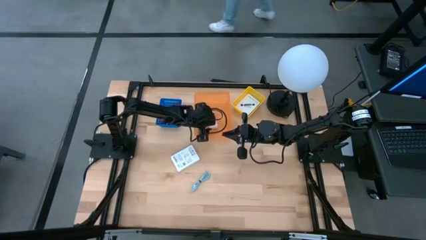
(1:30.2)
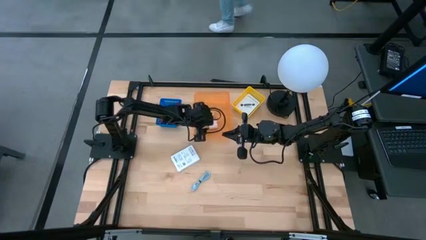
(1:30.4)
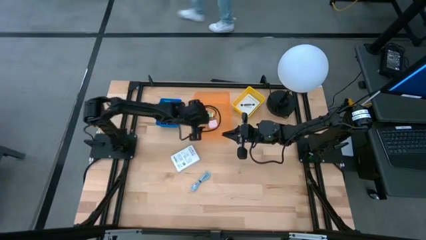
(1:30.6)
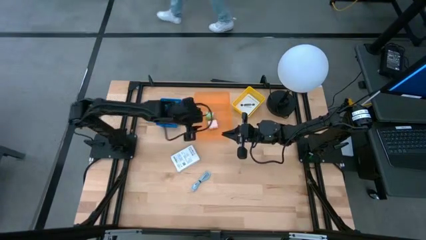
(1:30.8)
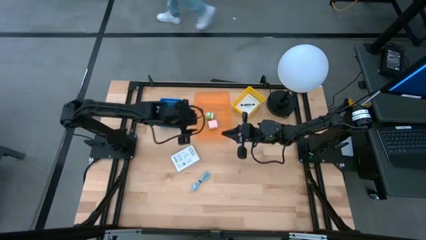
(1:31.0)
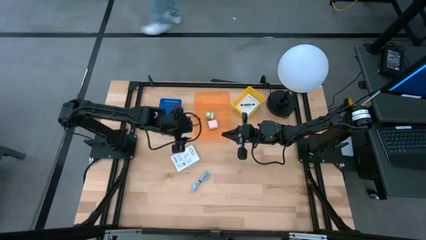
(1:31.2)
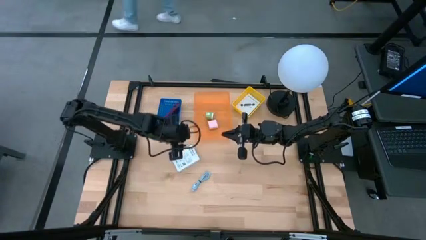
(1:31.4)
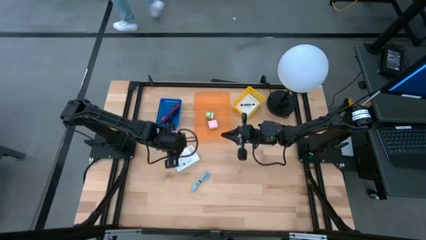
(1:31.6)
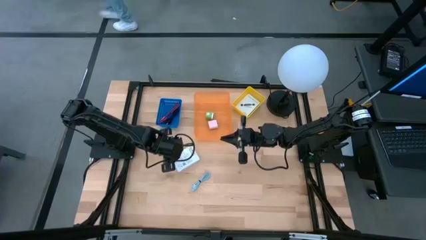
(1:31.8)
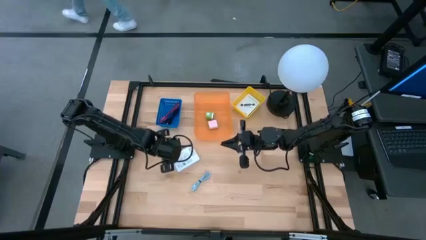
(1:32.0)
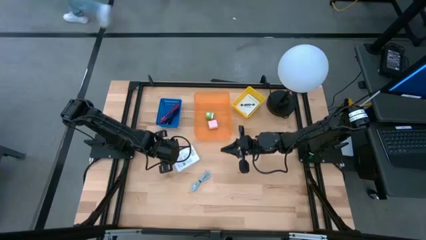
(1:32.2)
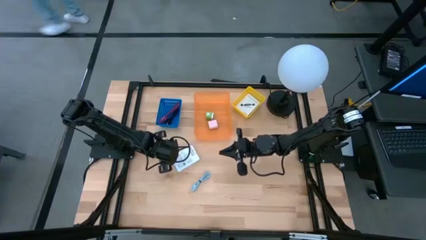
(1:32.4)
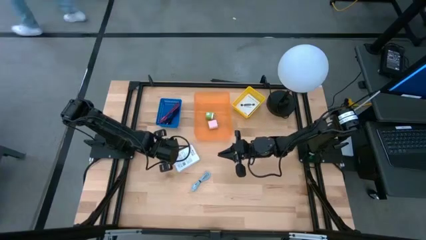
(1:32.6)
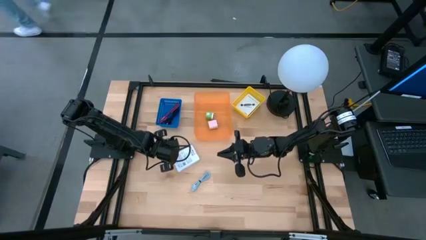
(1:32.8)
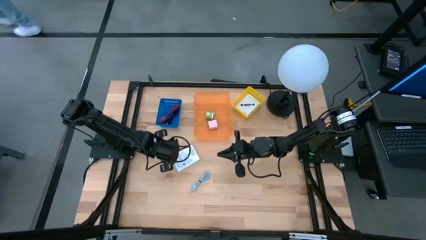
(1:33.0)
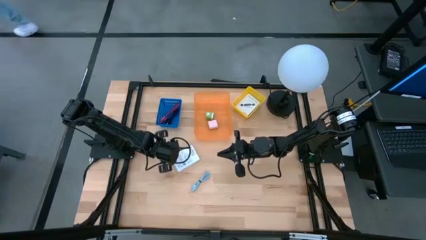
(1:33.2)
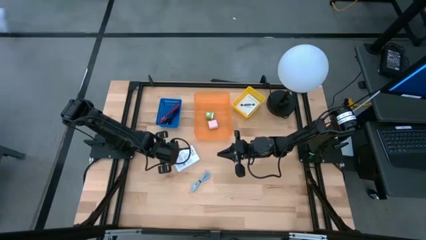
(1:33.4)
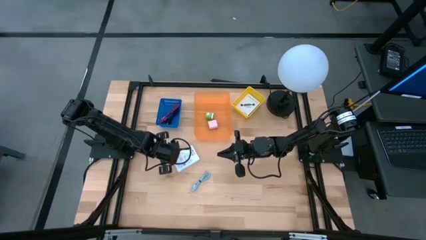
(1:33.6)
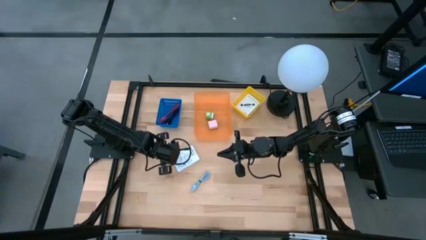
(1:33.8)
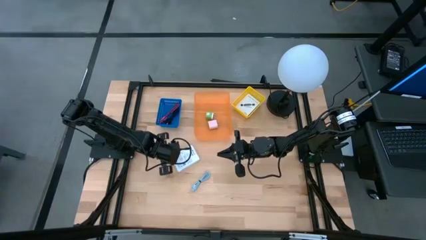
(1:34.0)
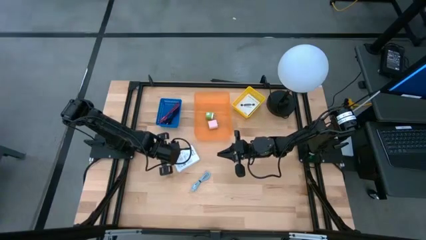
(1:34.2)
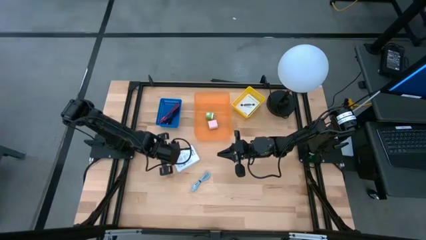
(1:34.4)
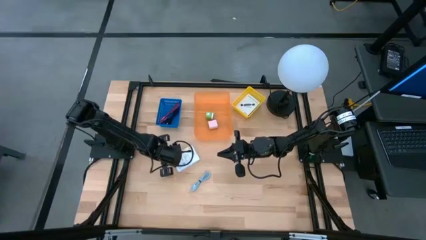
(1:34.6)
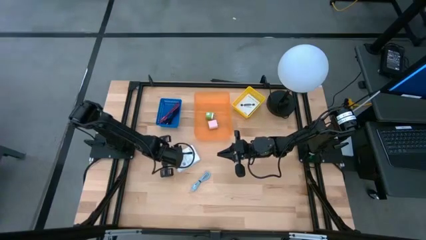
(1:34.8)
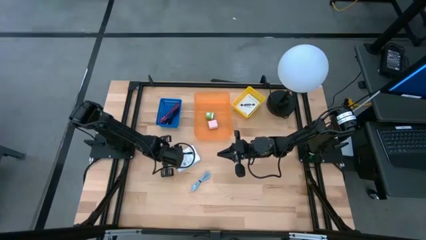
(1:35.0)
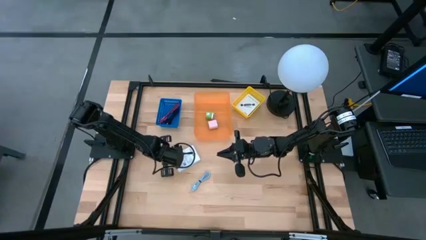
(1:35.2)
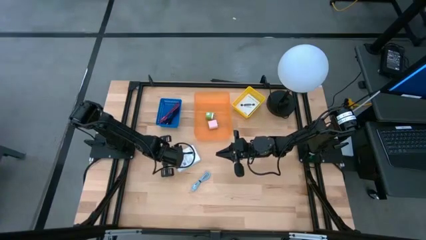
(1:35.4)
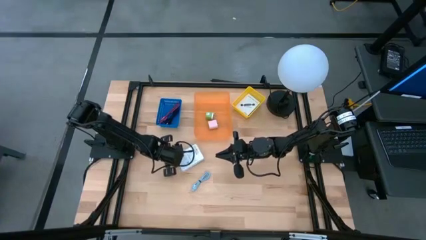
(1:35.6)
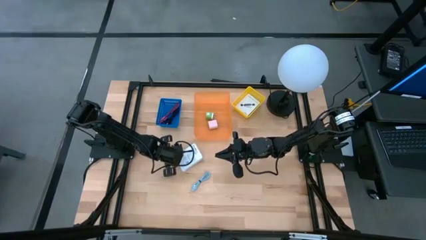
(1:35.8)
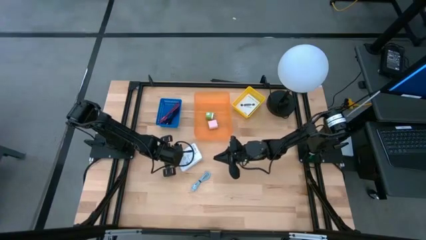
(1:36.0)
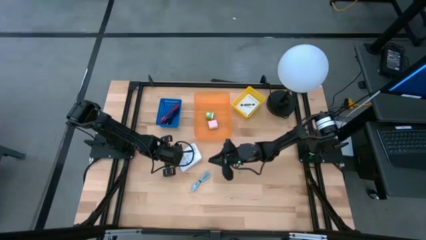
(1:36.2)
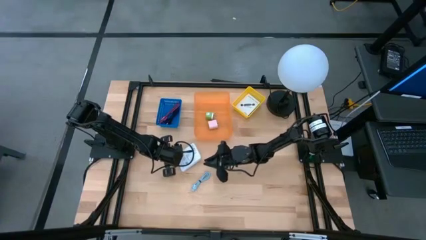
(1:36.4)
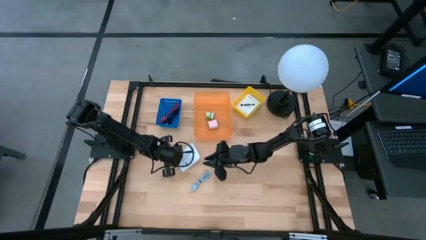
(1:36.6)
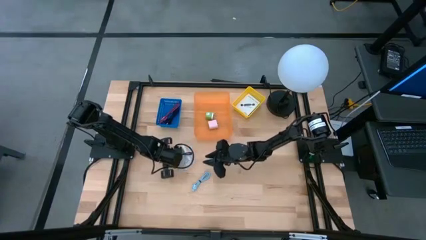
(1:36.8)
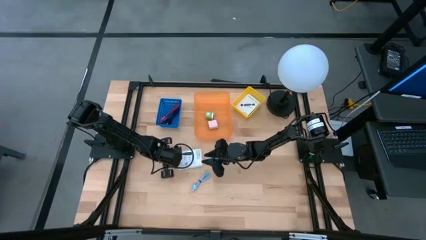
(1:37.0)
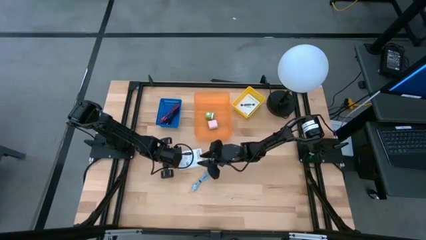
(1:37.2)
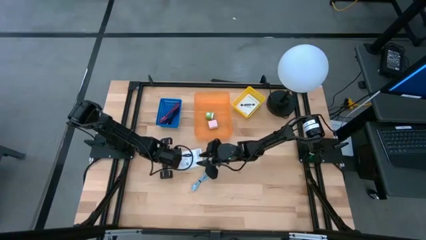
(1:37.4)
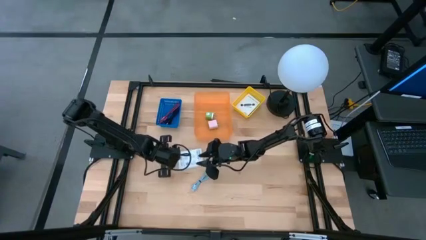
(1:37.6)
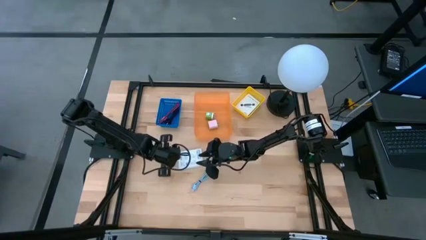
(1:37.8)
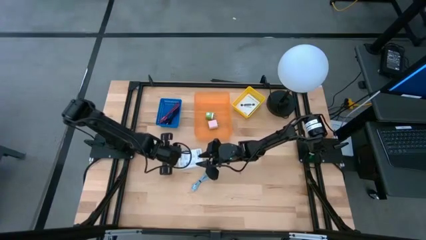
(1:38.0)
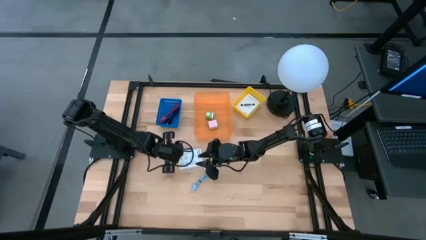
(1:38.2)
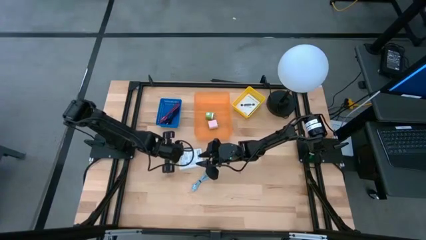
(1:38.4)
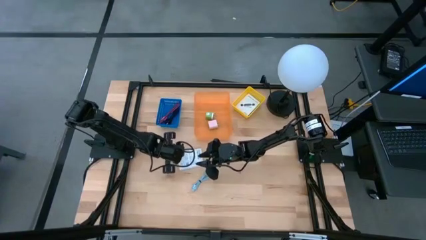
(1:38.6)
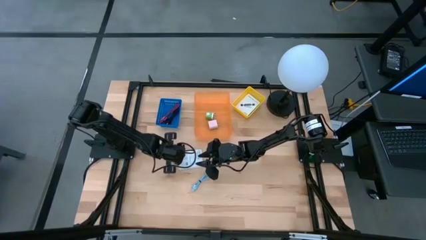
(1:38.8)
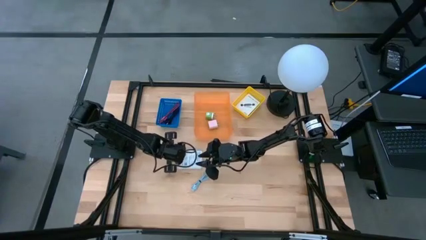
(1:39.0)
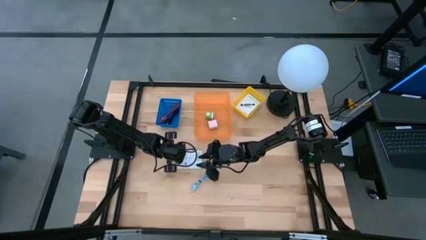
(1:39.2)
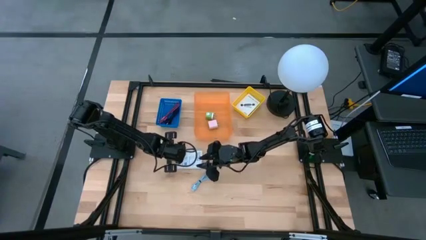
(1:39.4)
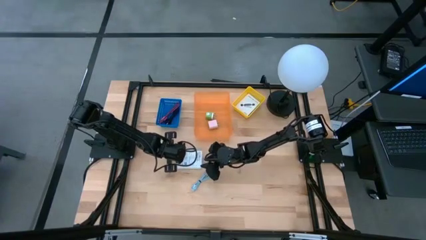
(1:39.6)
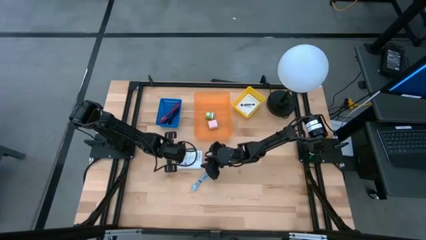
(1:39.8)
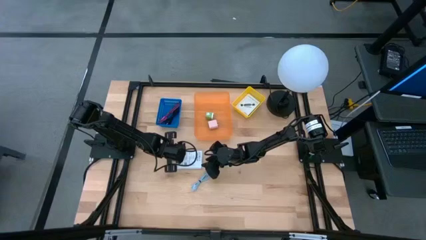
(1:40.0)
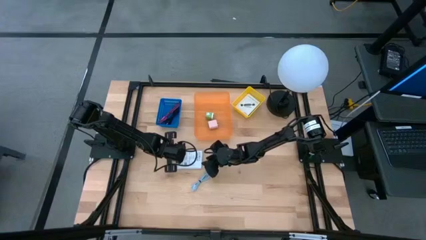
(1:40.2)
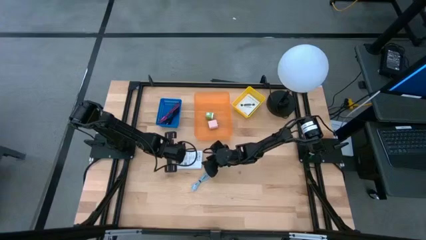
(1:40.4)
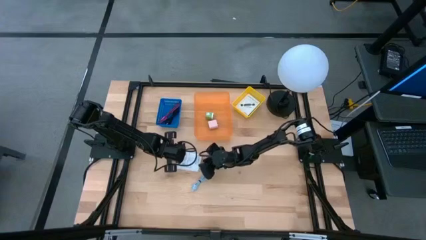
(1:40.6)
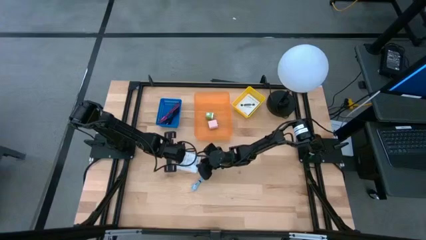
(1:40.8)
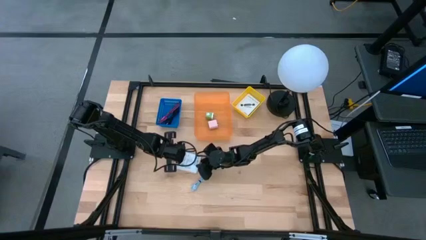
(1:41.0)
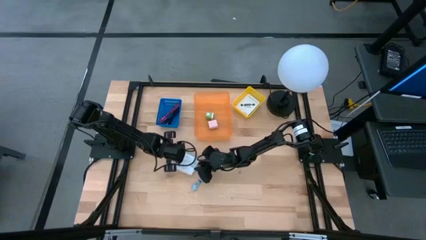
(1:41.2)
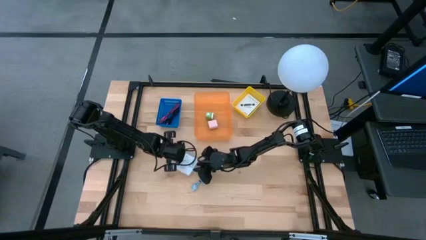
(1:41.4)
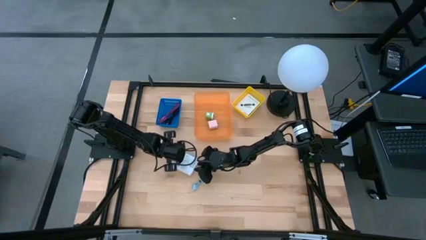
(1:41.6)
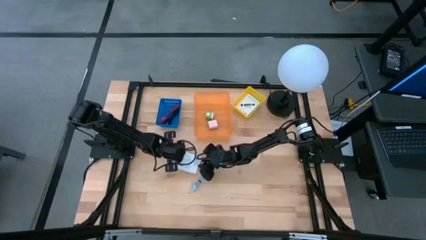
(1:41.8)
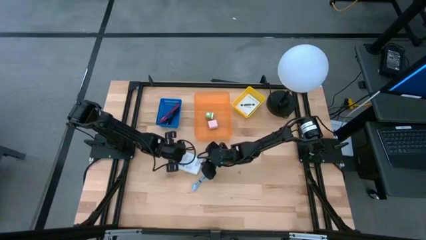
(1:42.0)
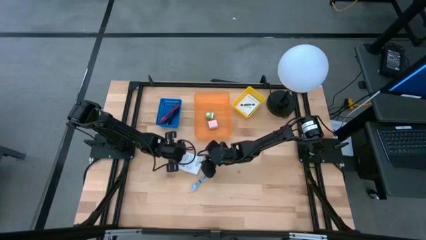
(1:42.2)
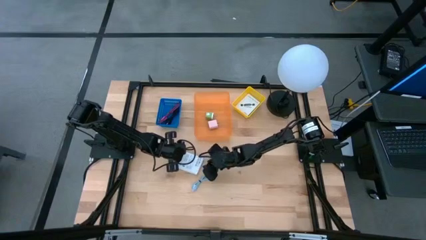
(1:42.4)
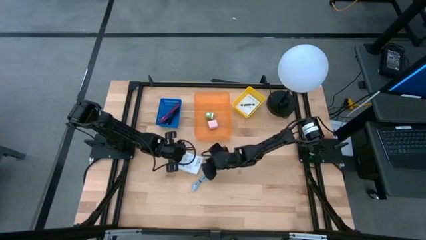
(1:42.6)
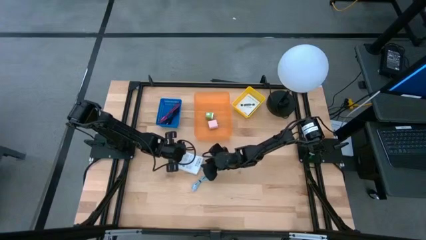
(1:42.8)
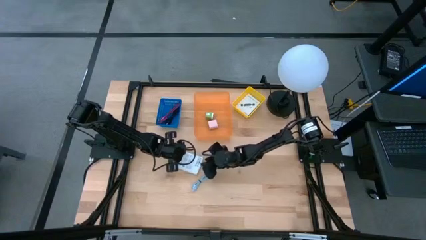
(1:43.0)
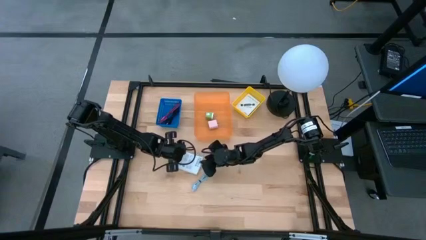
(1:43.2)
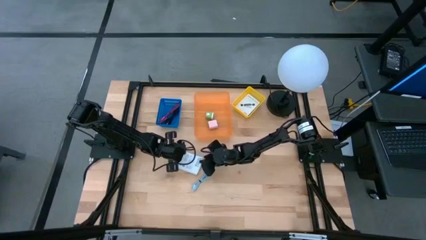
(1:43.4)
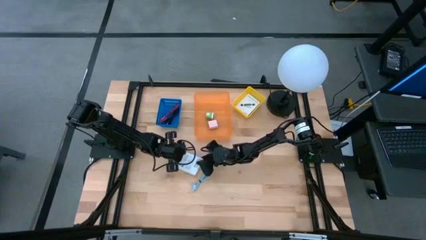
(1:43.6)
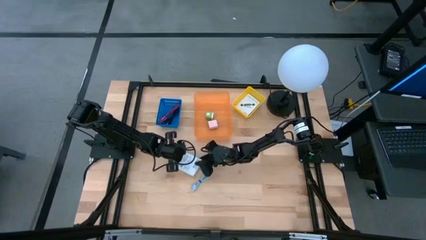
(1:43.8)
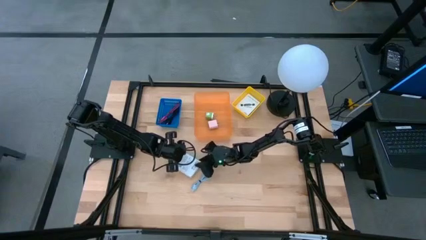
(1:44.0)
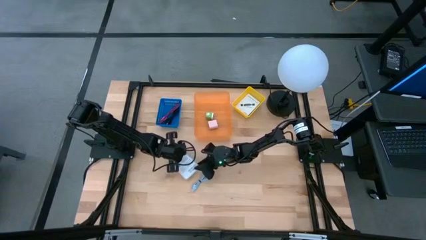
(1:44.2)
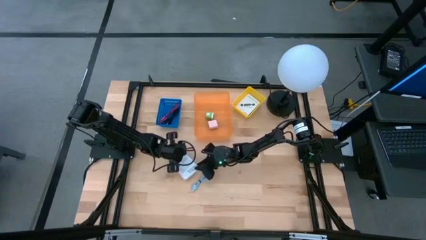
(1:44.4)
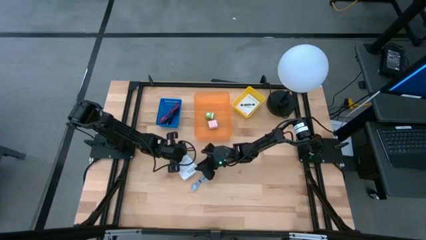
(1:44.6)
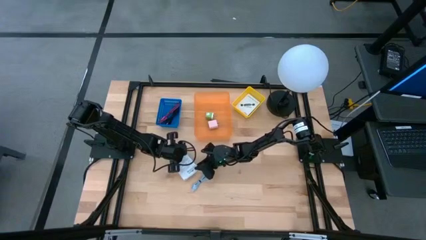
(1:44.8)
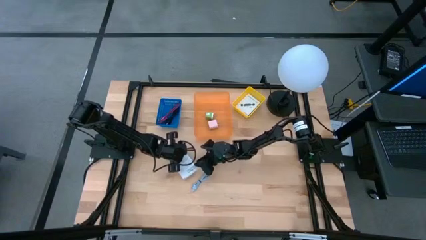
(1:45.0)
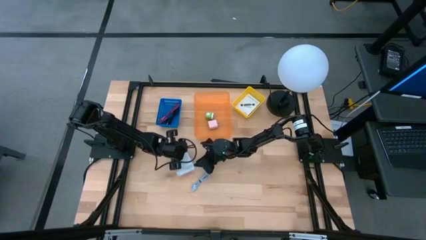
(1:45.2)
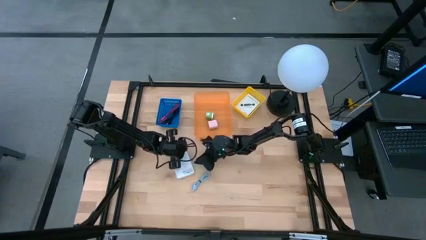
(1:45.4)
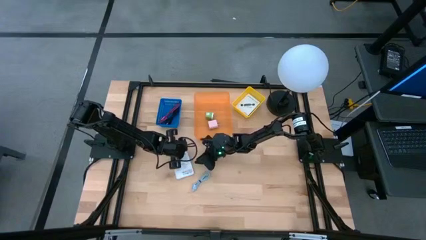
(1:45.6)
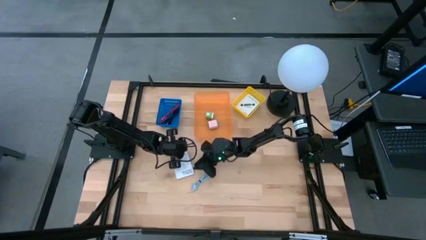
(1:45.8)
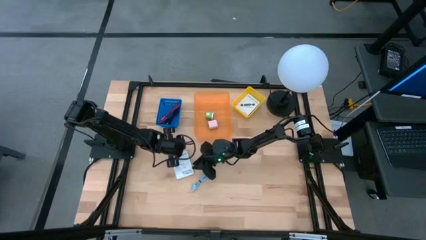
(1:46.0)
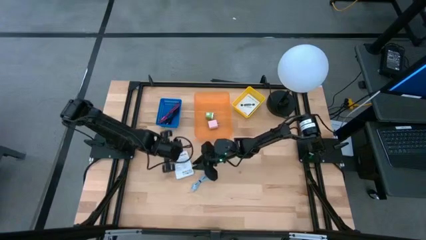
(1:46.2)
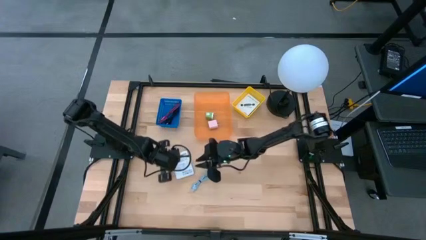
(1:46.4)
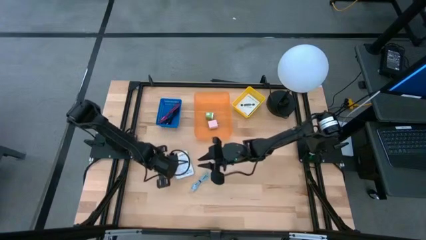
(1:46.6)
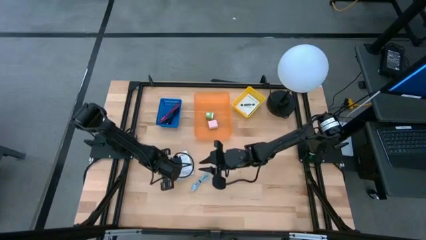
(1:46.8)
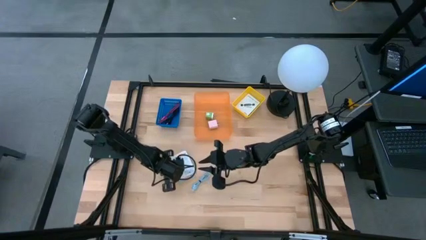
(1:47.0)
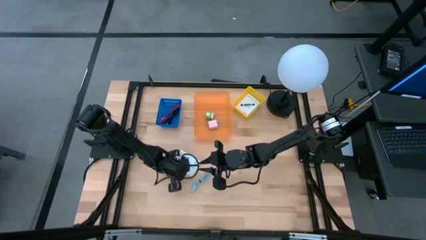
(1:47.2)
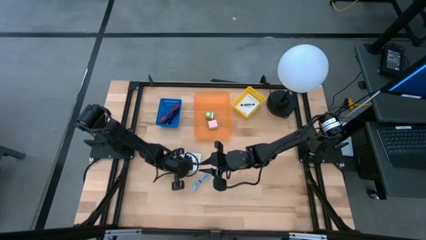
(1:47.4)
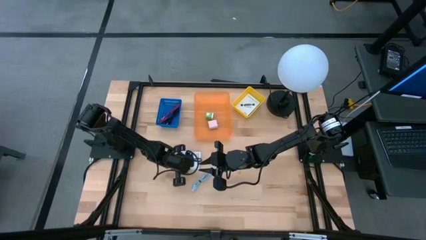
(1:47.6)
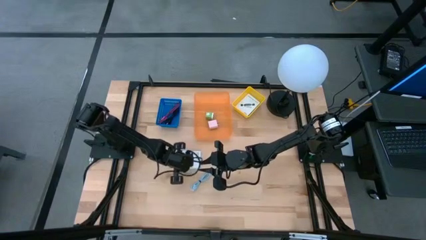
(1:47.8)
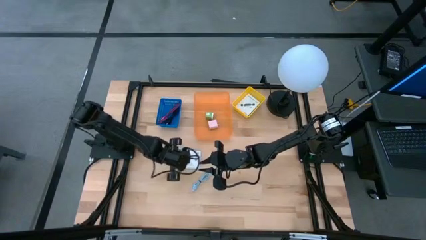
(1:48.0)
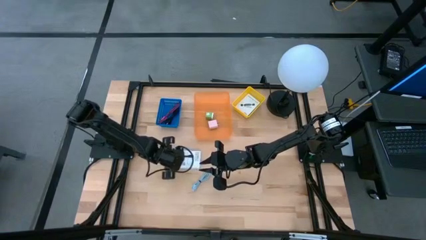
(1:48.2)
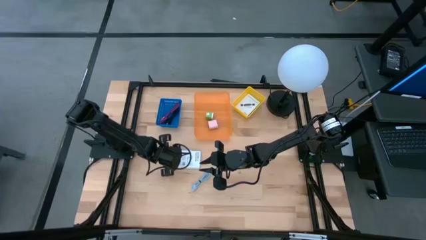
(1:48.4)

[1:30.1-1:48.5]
Task: Pick and place items into bin
Put the left card reader box into the yellow basket
